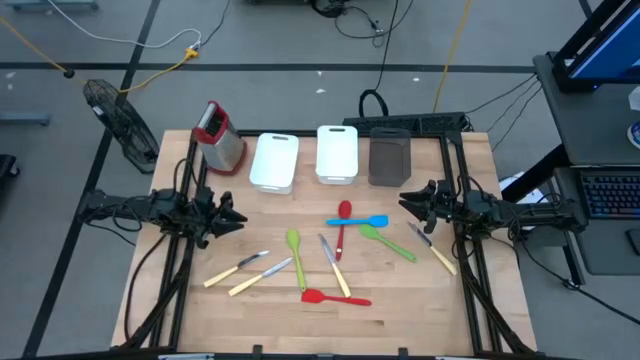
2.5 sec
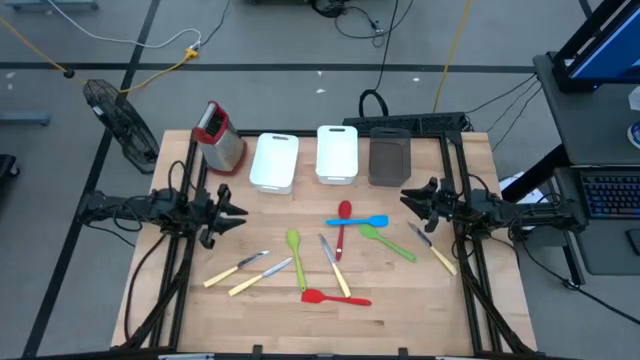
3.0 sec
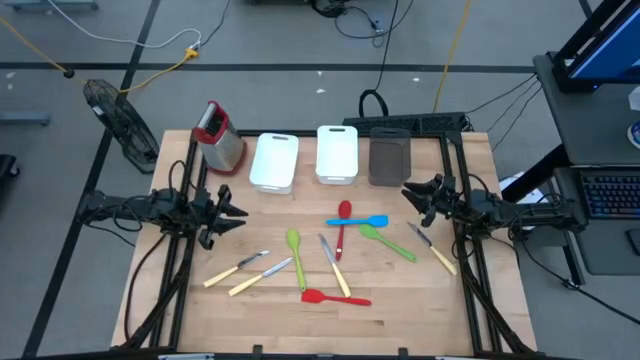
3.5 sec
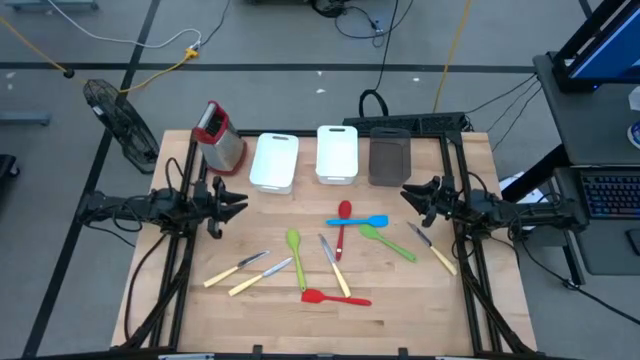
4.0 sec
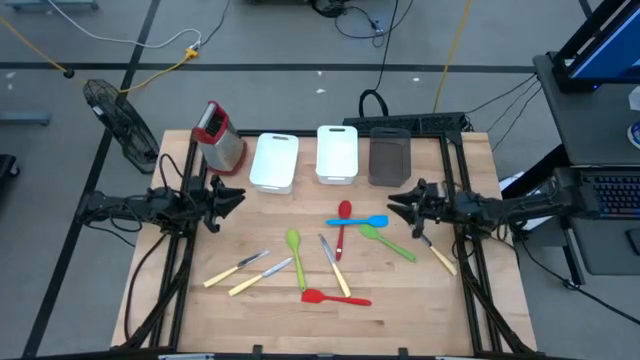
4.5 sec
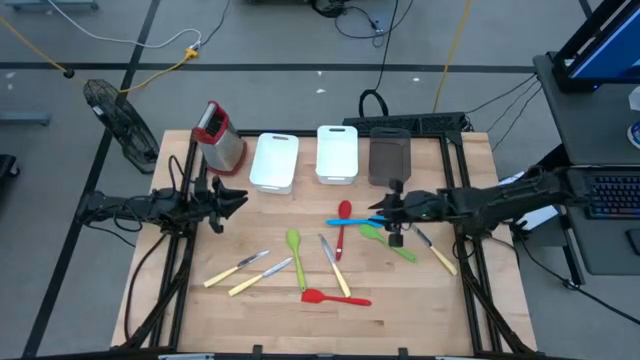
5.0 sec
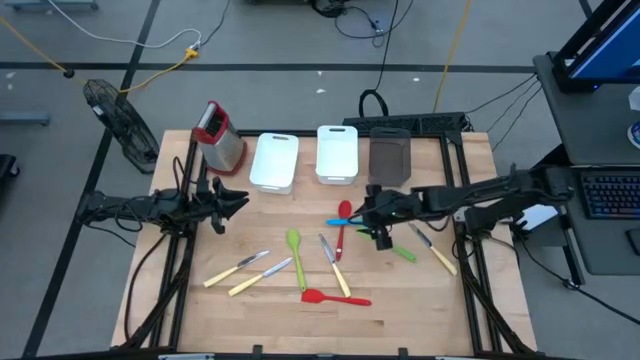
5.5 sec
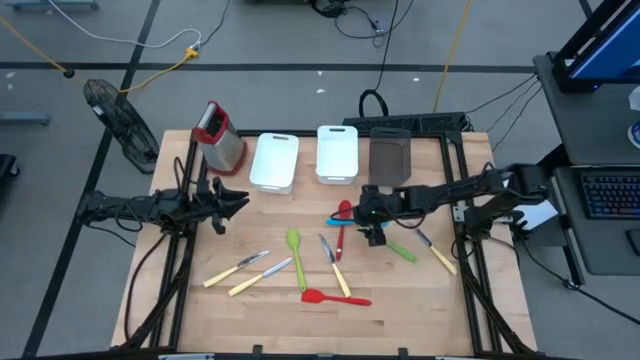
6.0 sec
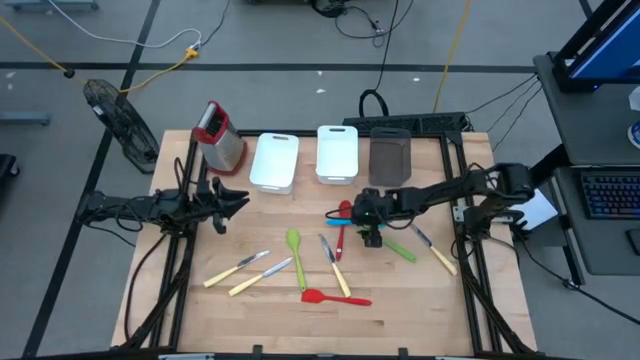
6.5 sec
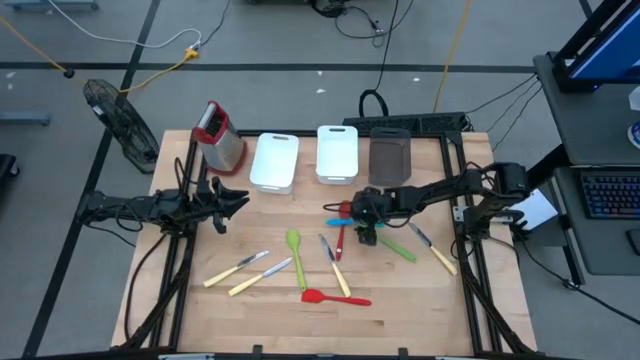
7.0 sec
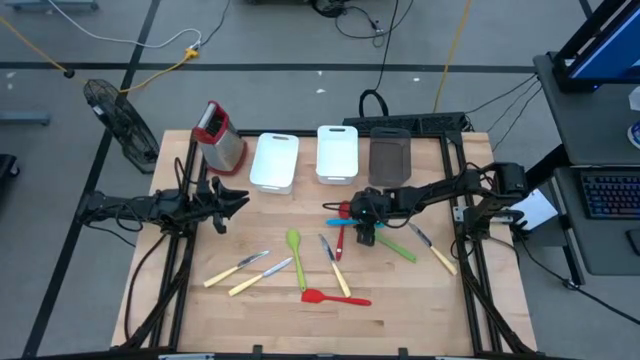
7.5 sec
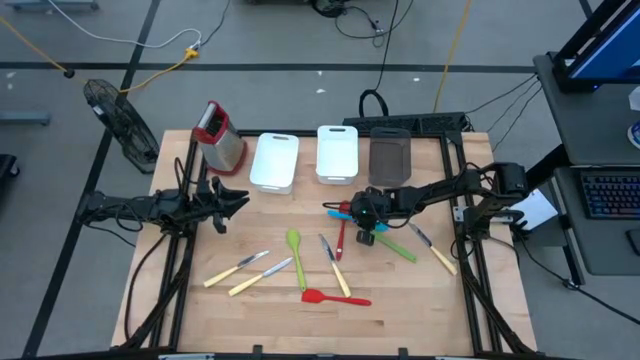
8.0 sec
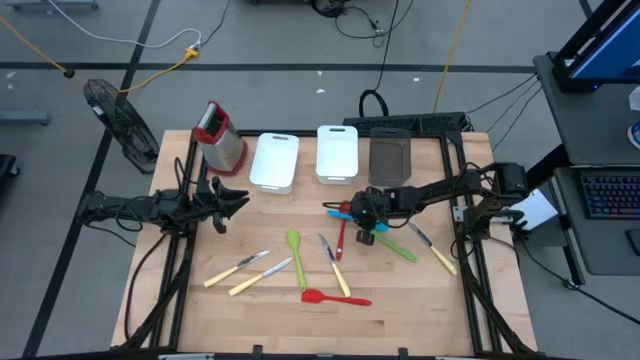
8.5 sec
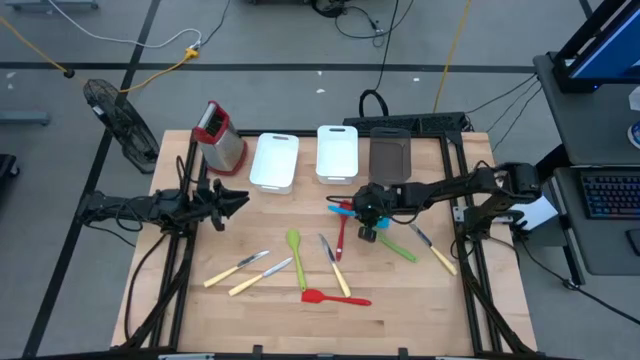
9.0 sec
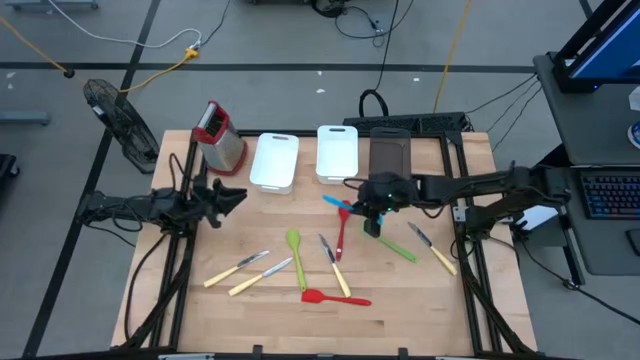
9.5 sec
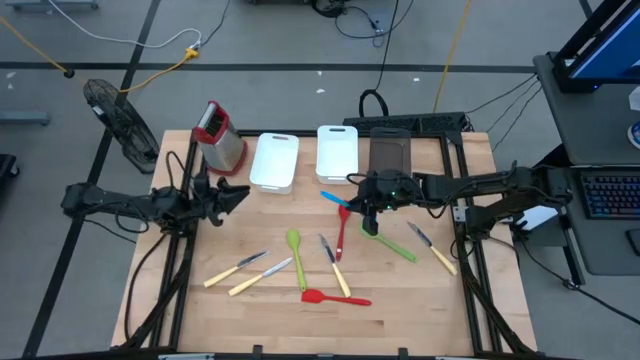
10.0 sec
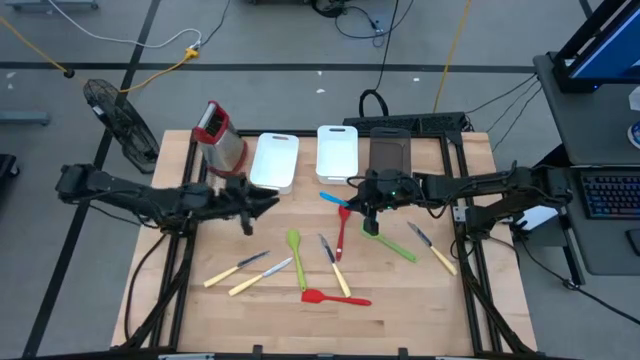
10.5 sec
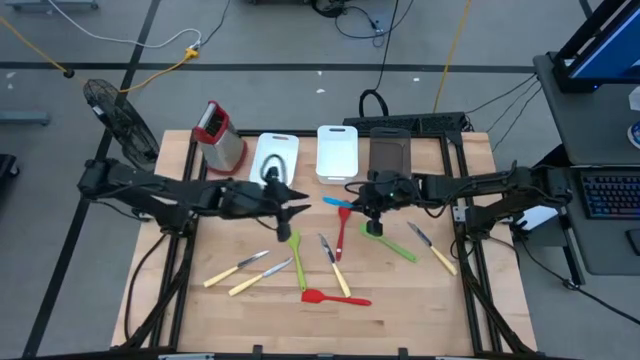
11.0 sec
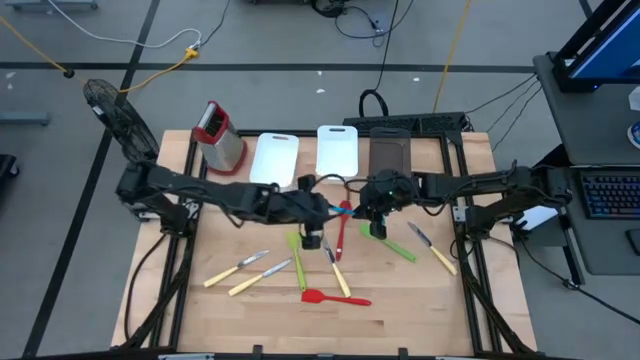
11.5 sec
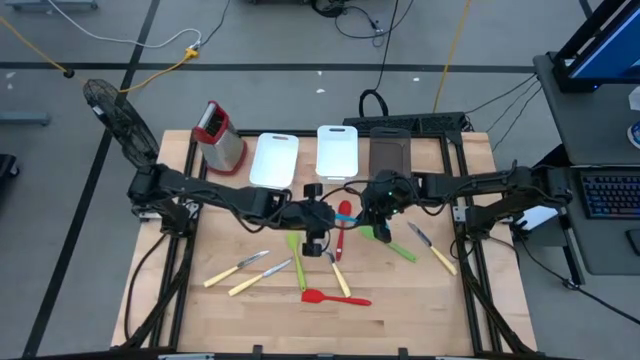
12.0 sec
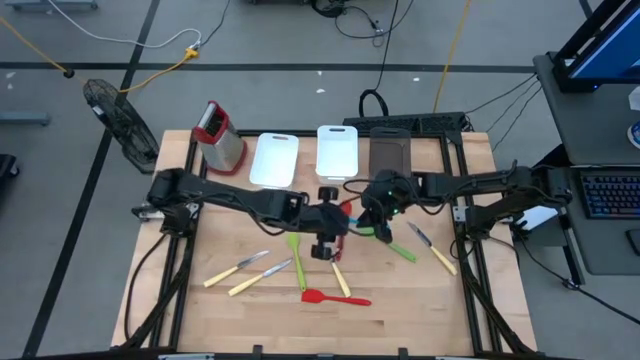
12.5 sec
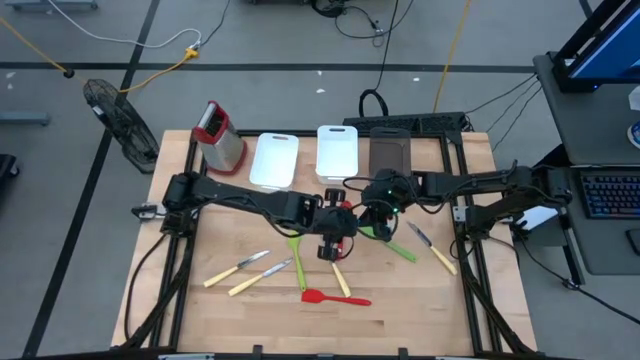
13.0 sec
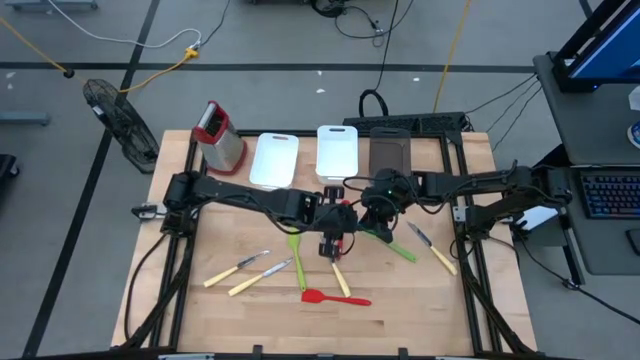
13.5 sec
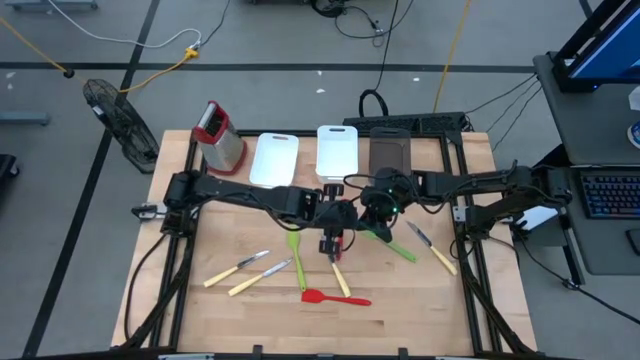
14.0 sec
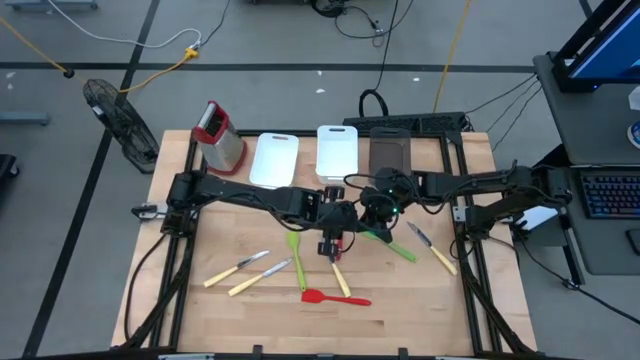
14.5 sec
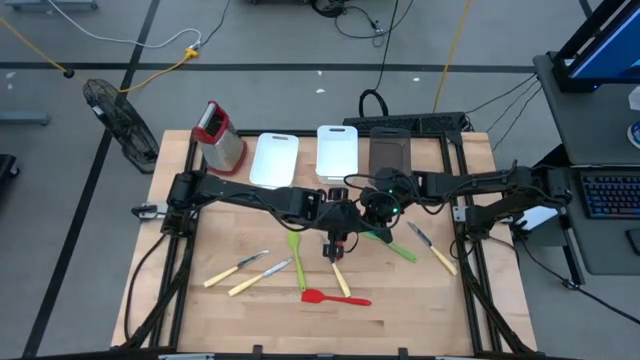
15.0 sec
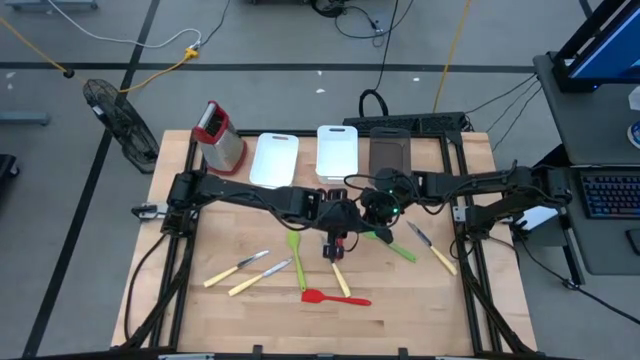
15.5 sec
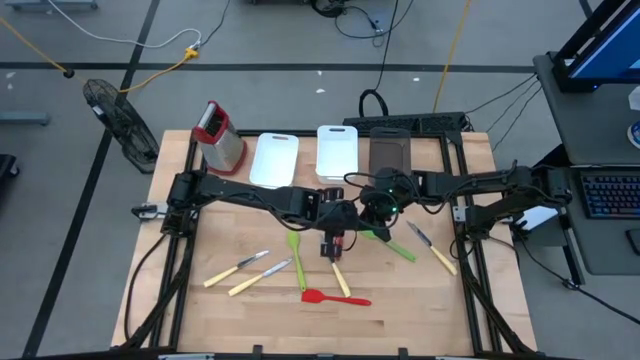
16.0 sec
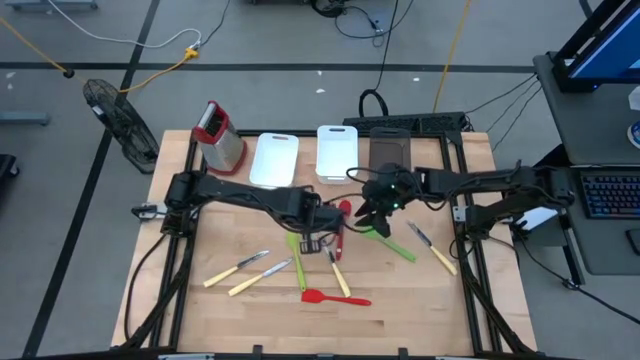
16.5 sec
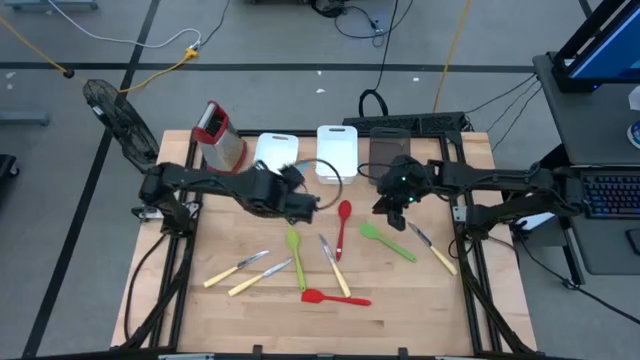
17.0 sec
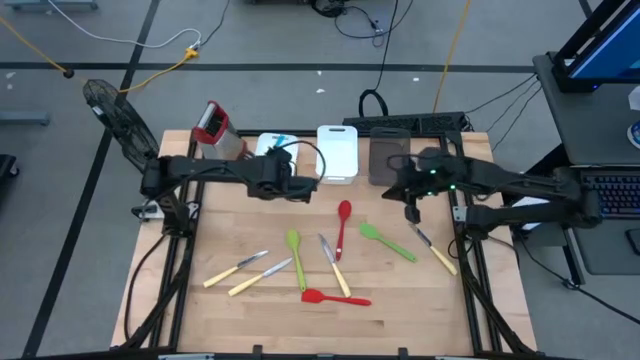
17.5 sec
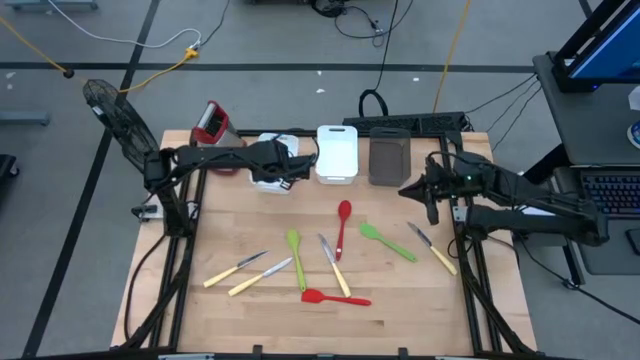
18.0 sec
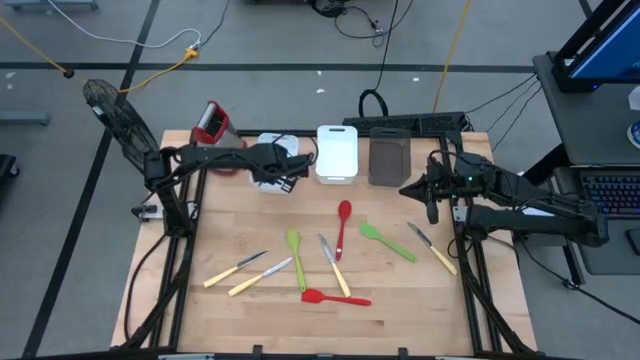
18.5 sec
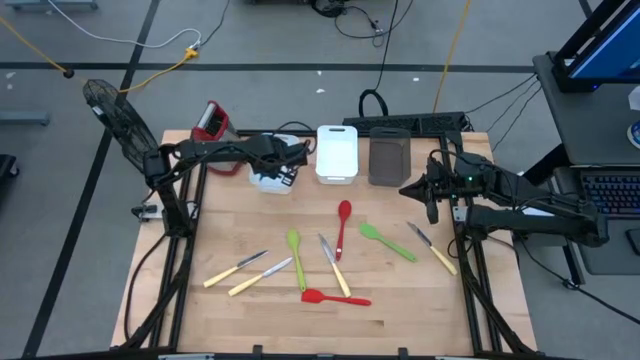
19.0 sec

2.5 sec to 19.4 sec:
Task: Pick & Place Kitchen Items
Put the blue spatula into the left white bin

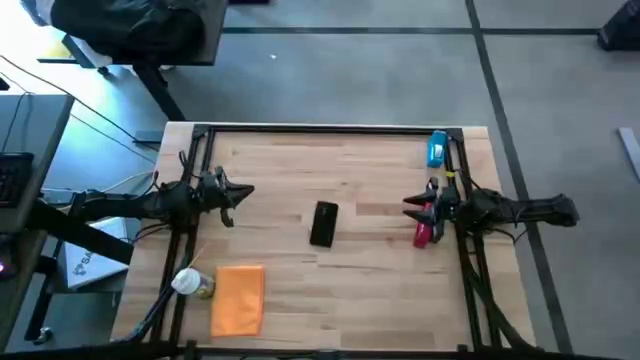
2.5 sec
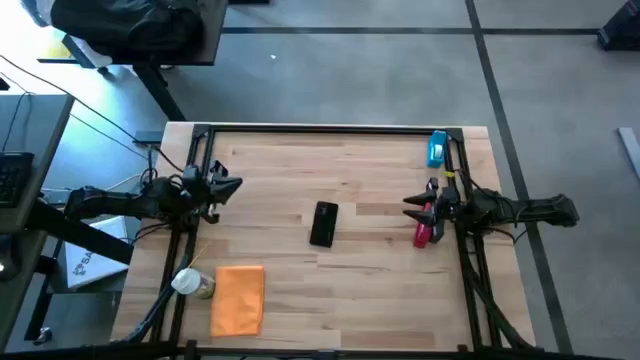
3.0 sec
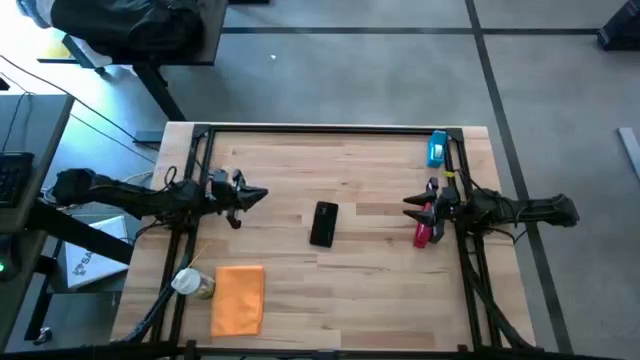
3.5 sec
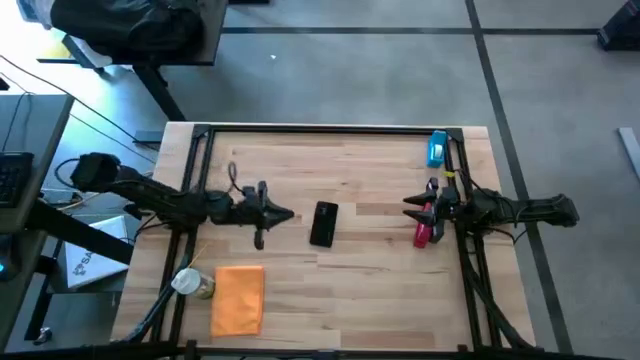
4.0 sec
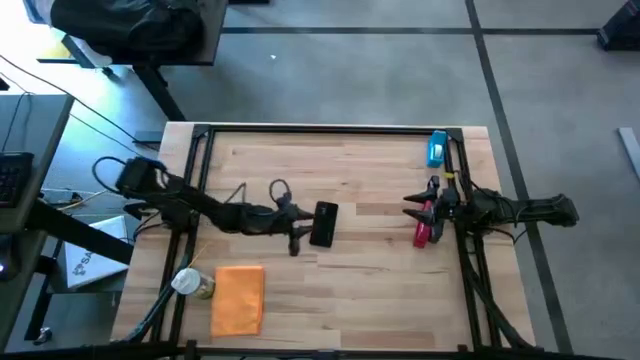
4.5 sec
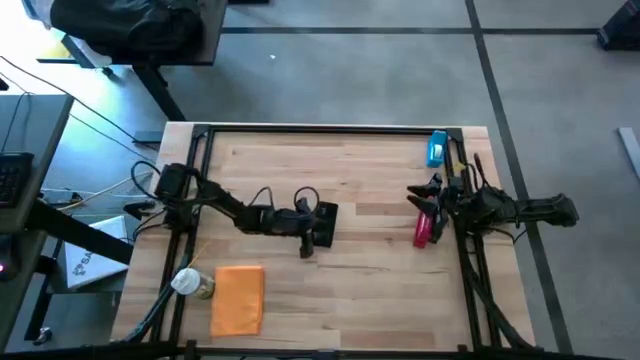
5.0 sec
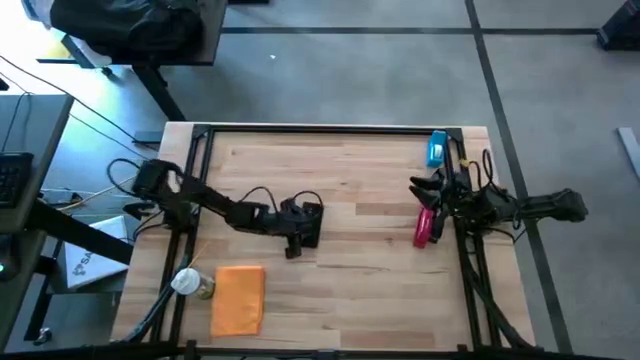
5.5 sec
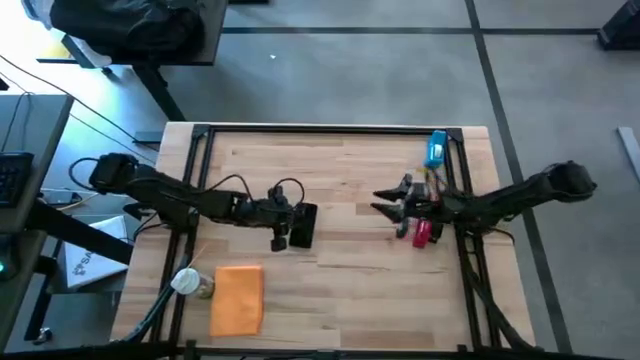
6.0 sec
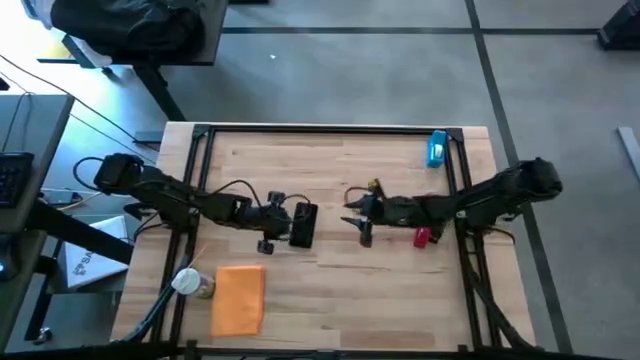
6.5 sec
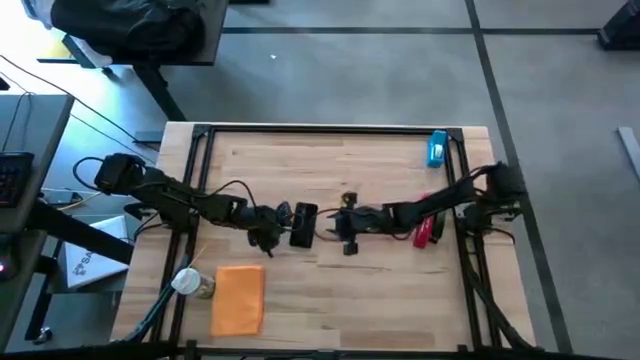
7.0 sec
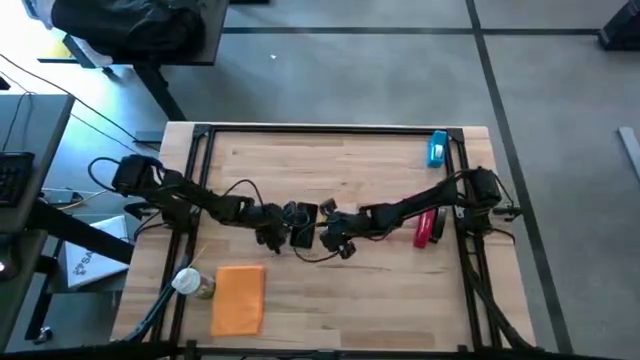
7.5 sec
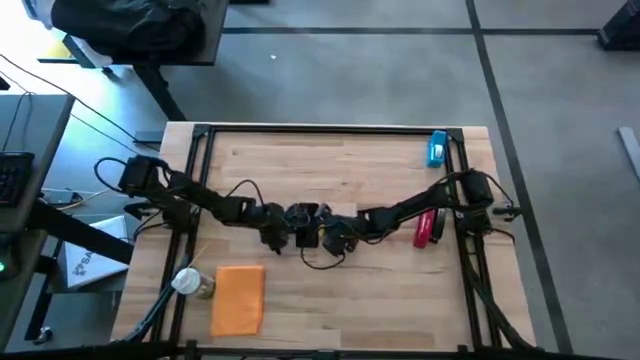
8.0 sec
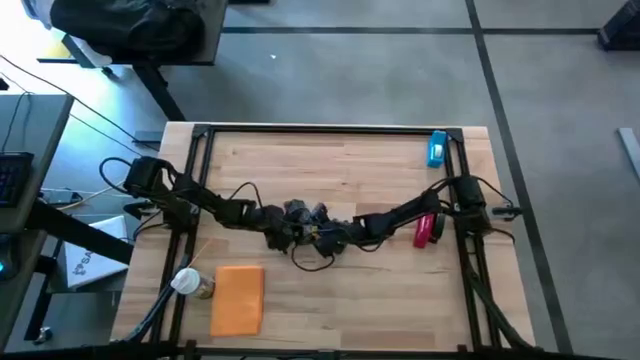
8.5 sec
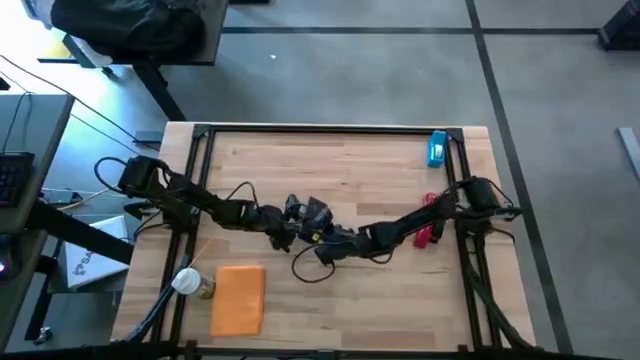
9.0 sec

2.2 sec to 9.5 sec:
Task: Apply microfiber cloth
Spray the black cellphone using the spray bottle
